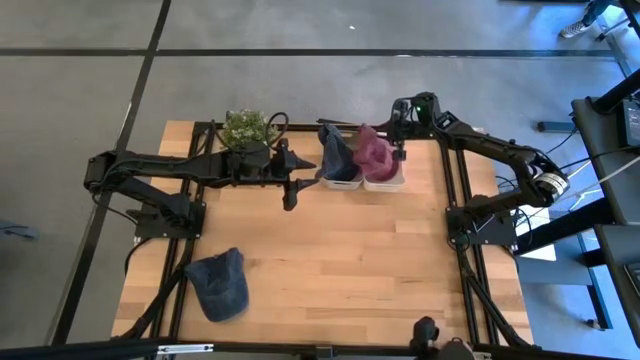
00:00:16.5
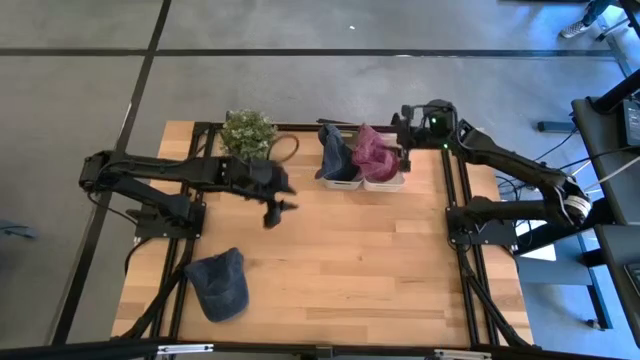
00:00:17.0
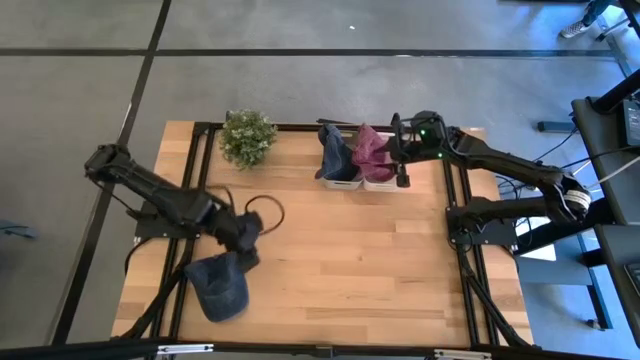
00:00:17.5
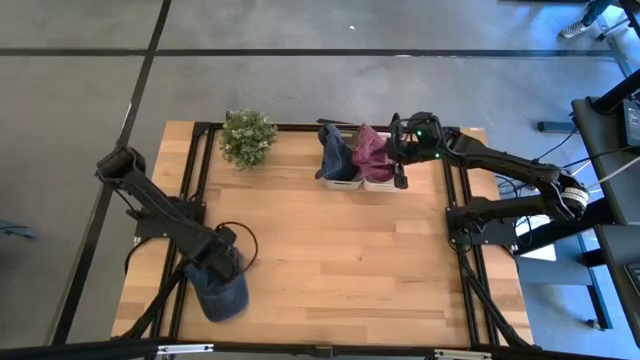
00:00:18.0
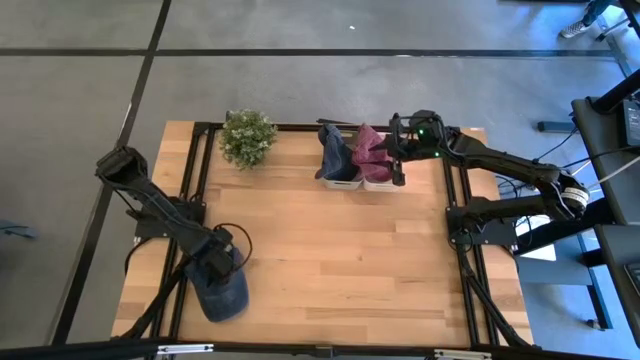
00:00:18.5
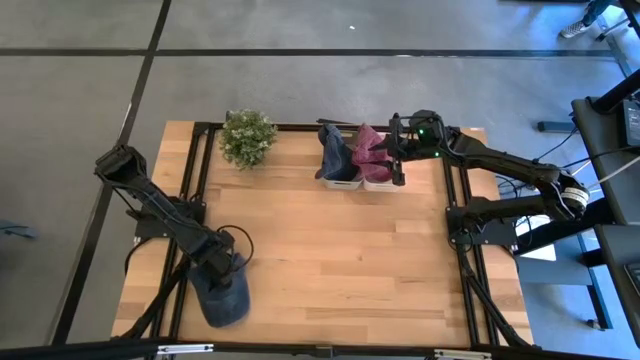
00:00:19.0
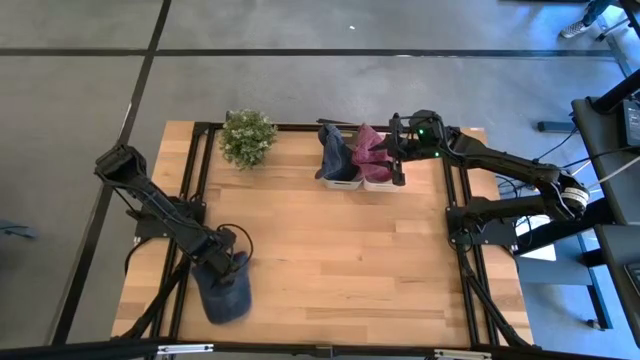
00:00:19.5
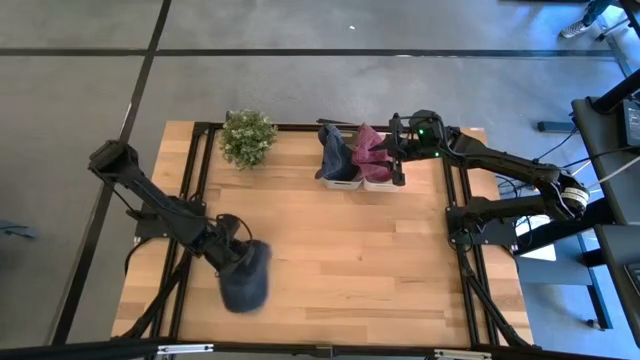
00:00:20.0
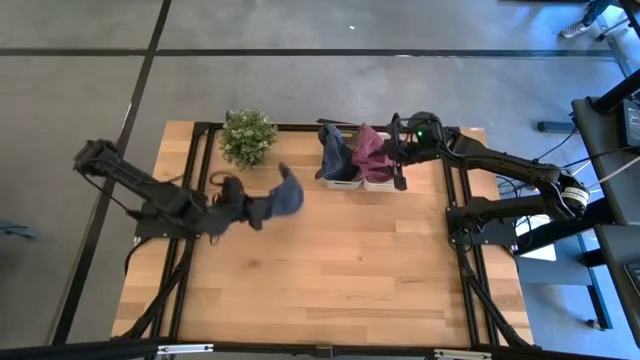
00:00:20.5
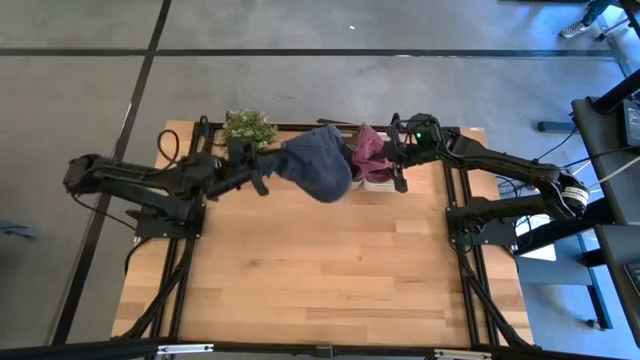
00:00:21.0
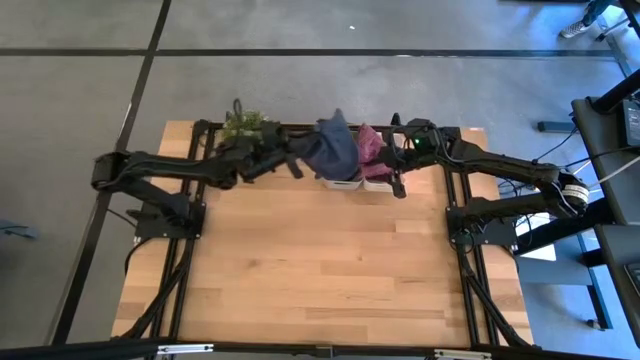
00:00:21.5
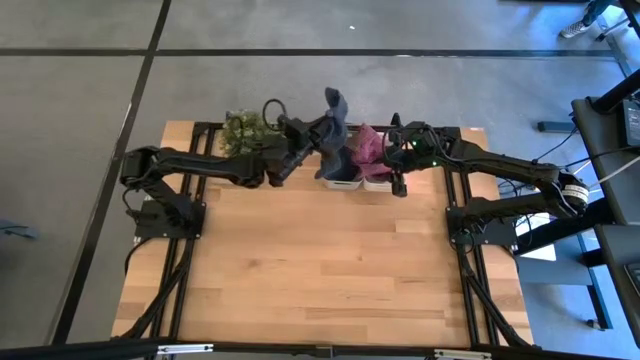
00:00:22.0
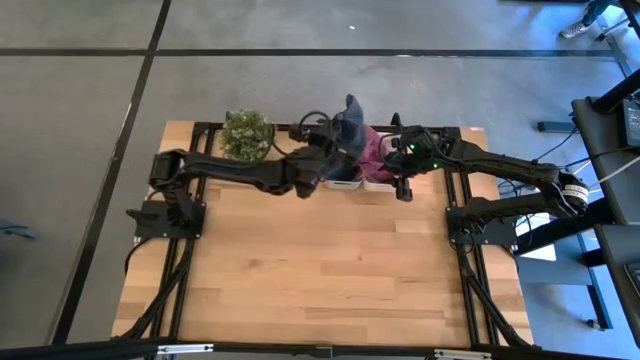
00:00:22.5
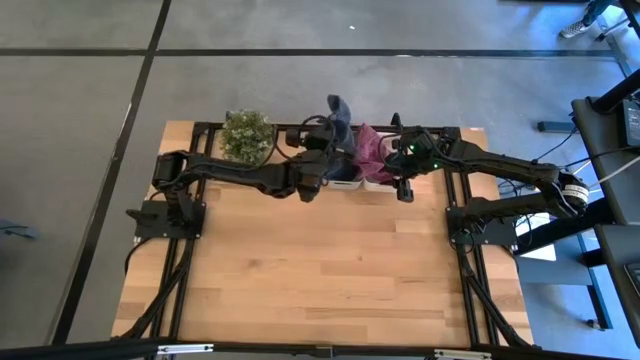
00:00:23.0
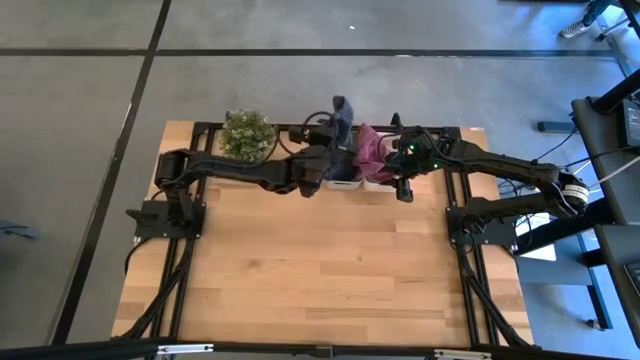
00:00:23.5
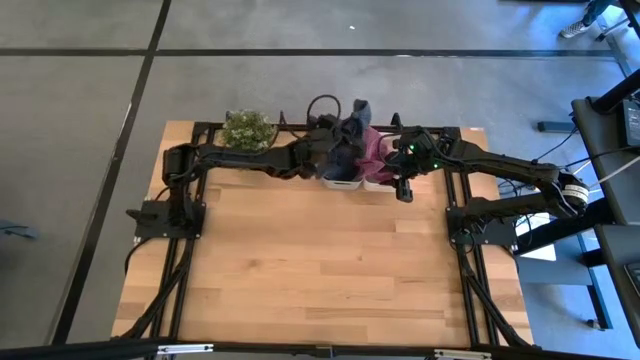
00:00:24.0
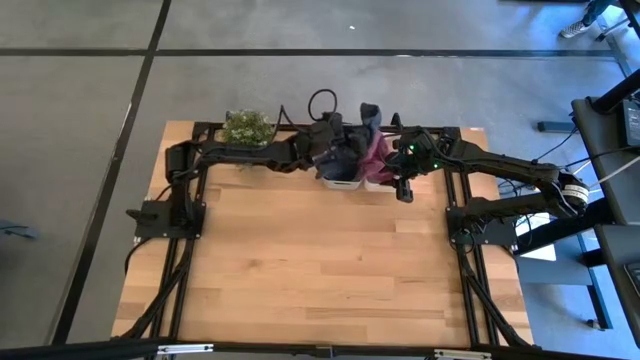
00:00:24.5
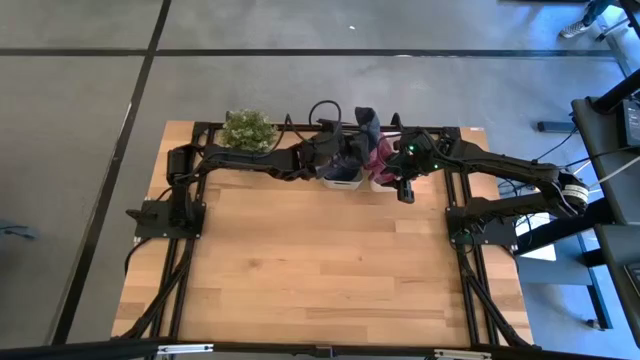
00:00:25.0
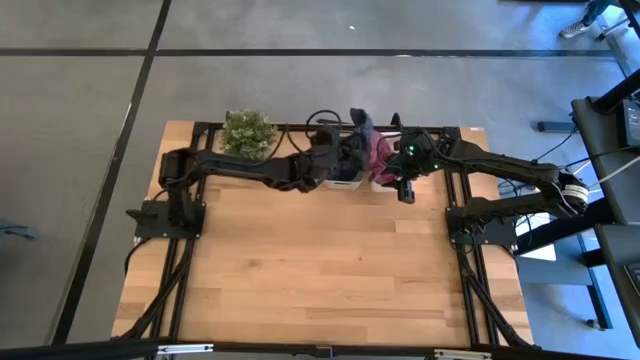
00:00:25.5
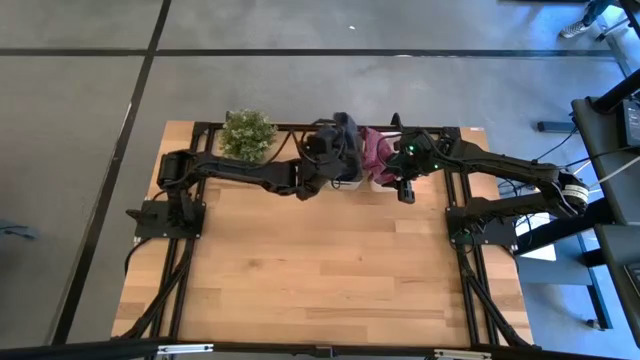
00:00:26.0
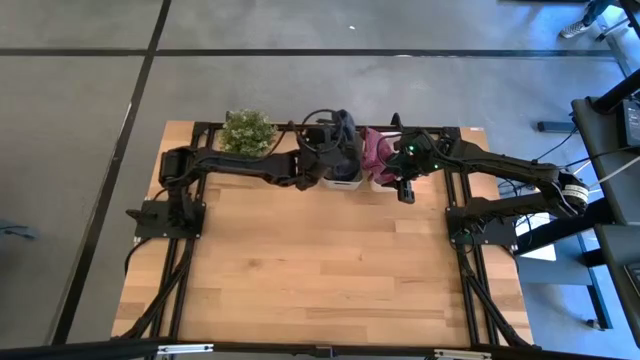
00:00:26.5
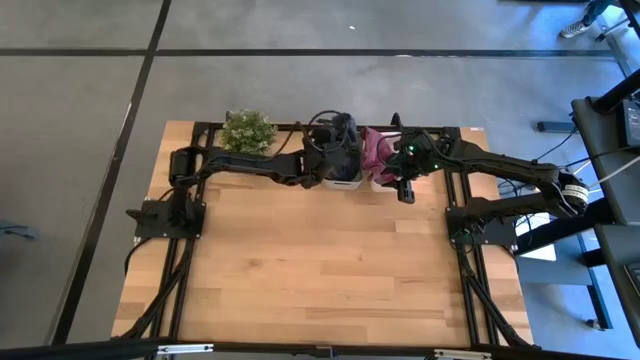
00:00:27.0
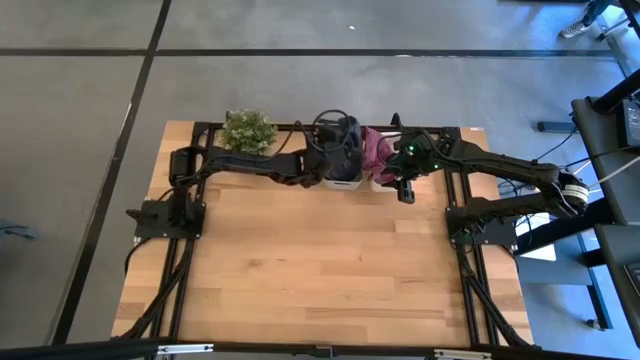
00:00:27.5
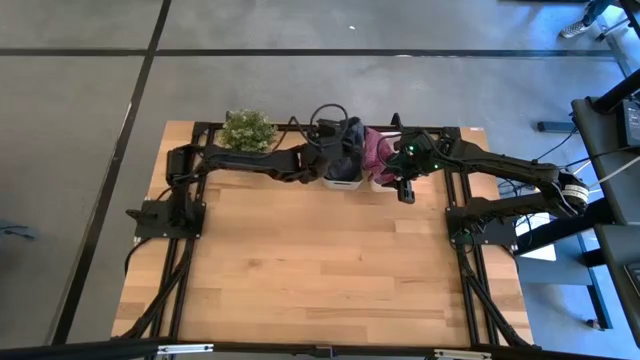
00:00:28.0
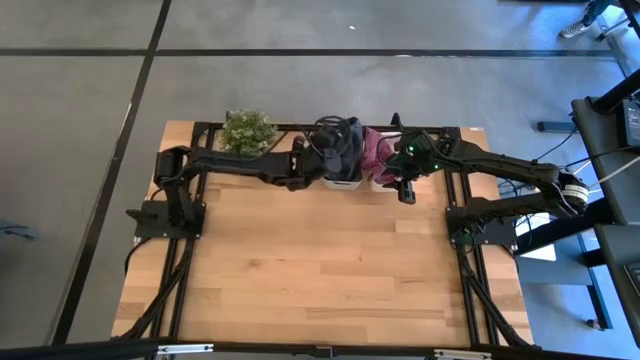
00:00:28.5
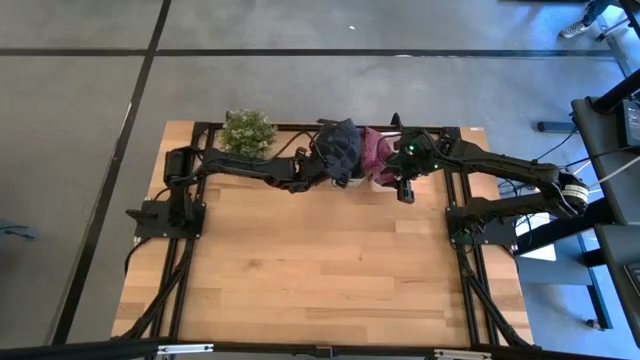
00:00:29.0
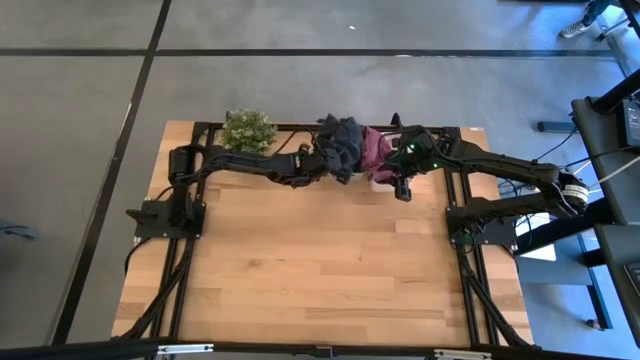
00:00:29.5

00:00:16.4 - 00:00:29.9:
Task: Pick & Place hat
Put the black cap into the gray bin

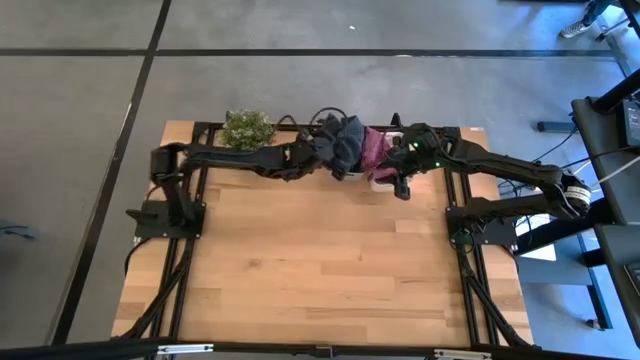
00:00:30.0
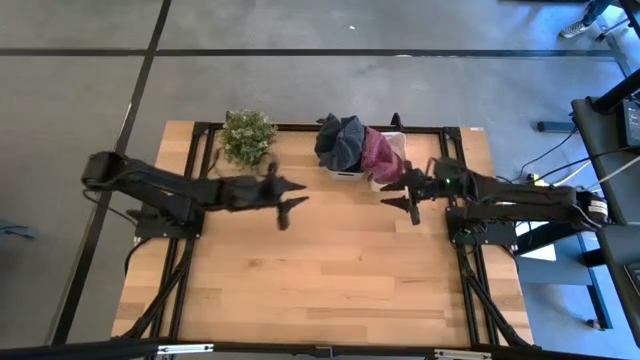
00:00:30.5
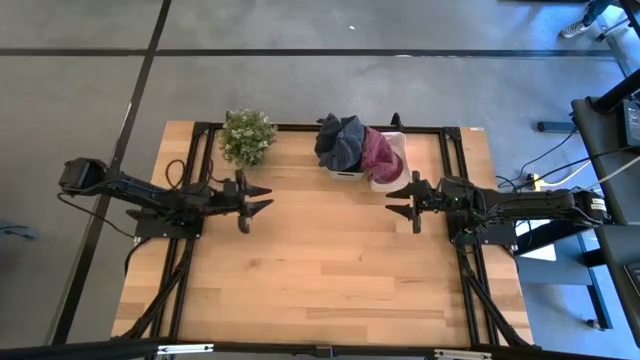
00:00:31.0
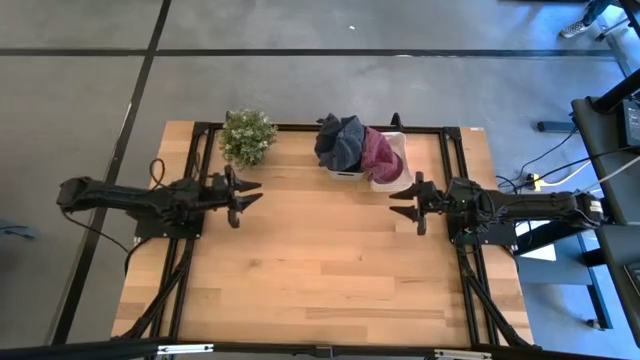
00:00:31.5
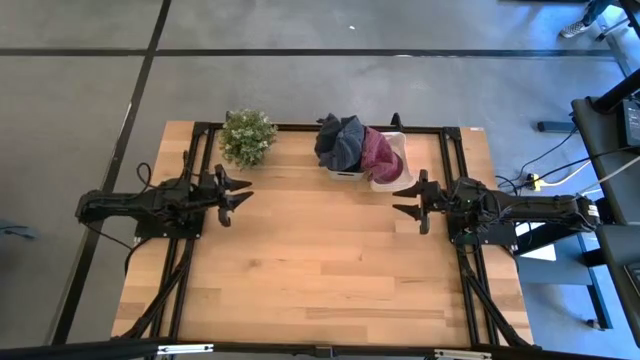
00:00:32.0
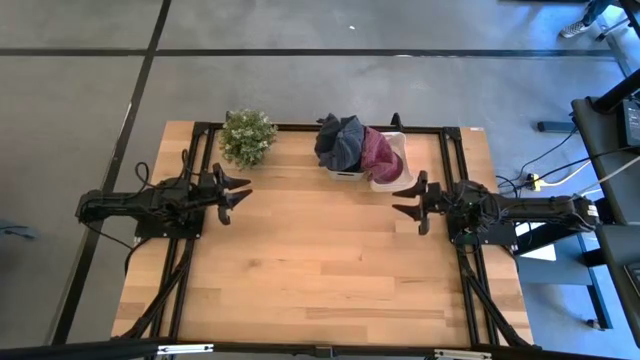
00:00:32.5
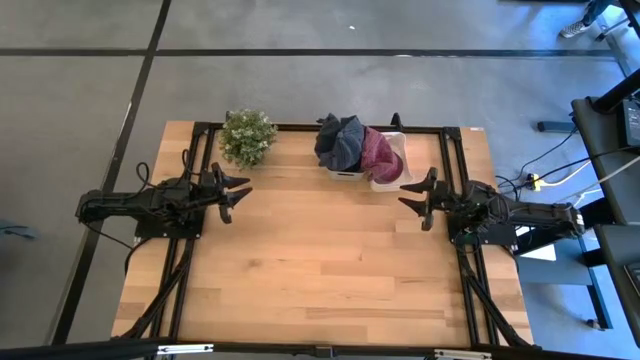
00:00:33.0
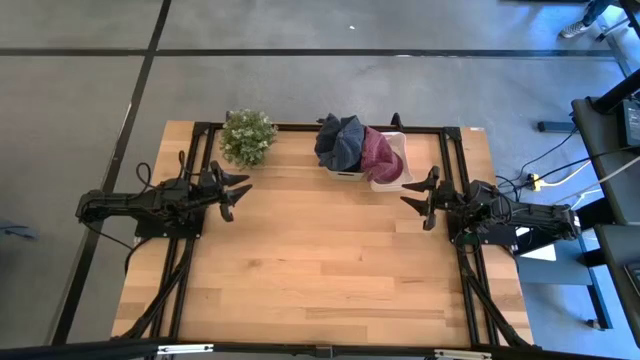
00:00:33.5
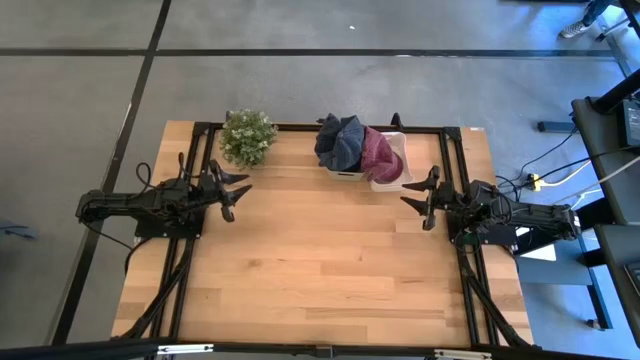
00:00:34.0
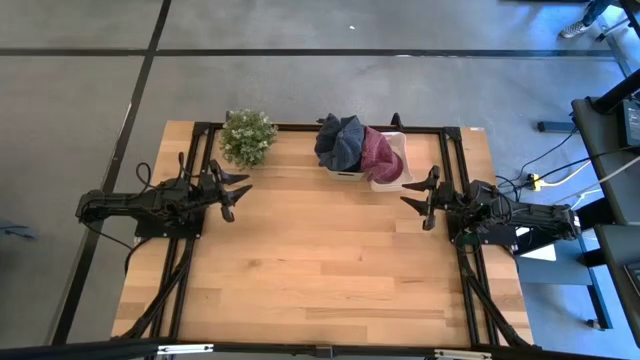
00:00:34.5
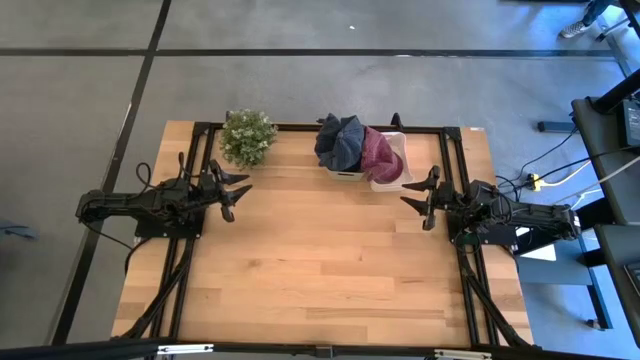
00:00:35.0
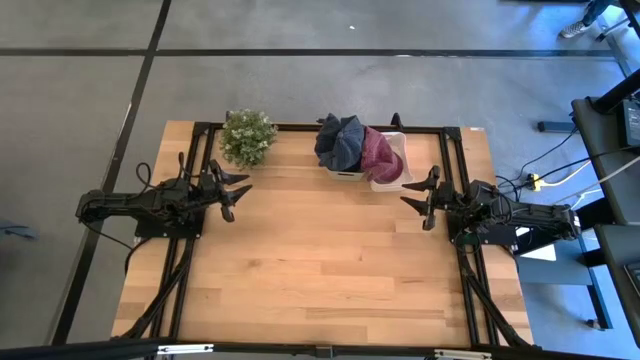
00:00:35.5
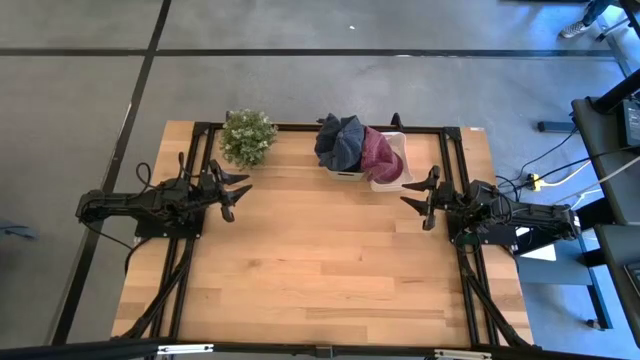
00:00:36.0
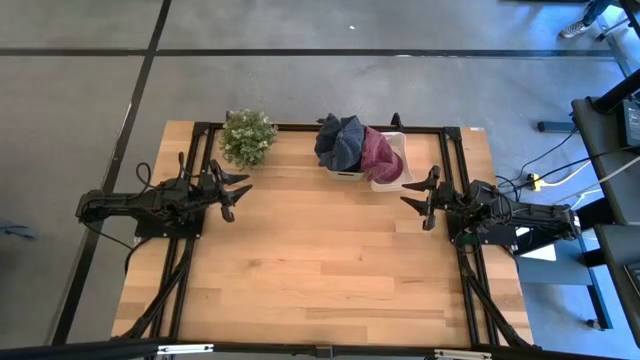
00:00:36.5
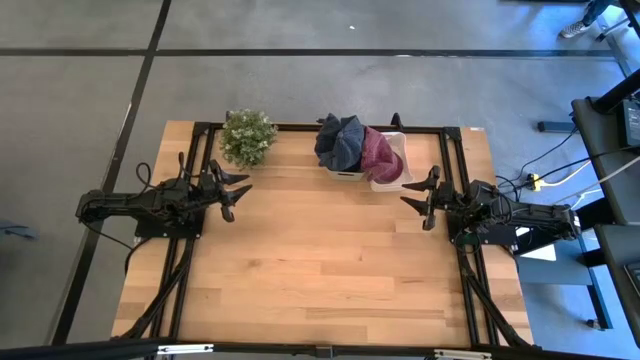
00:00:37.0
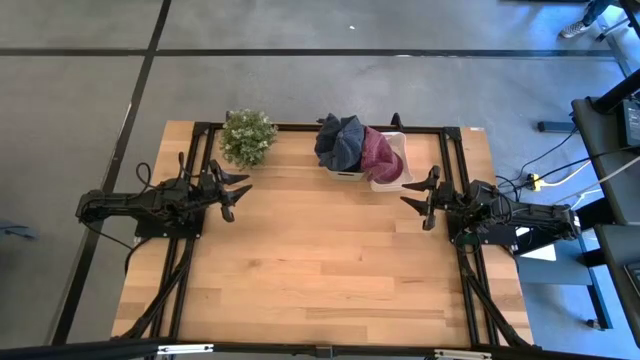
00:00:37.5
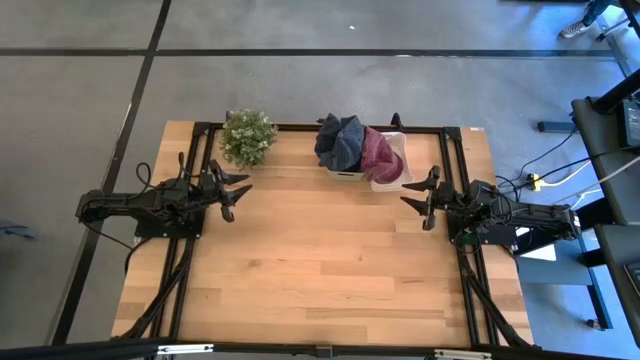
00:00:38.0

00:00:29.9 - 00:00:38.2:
Return to Home Position
